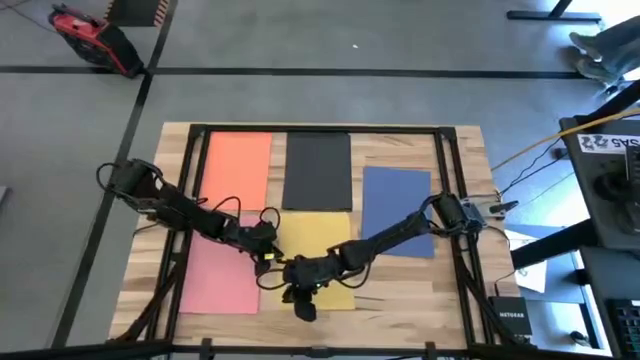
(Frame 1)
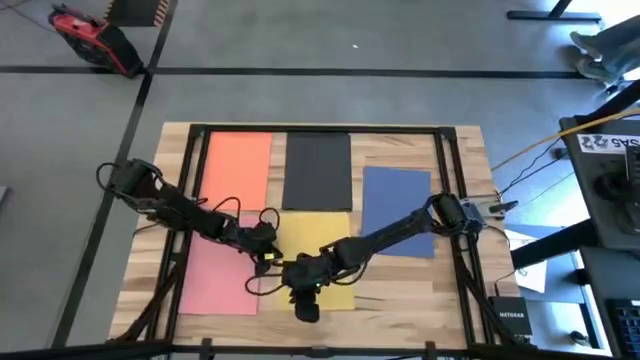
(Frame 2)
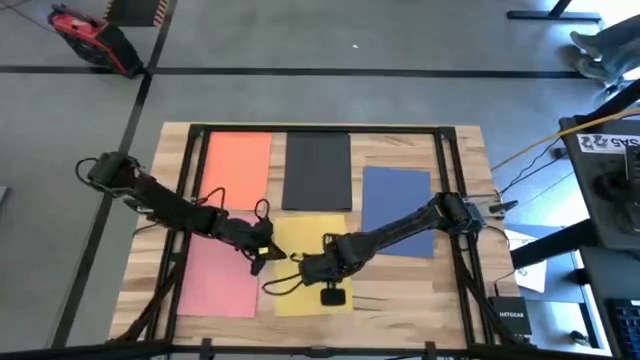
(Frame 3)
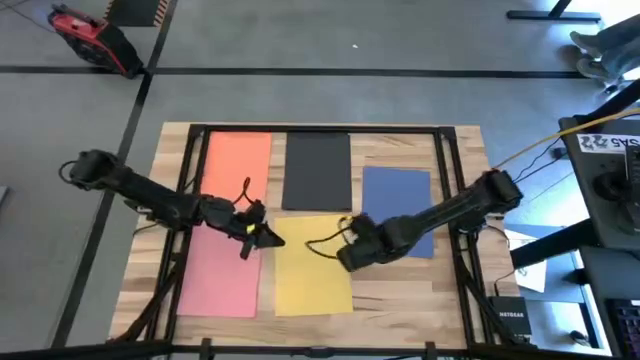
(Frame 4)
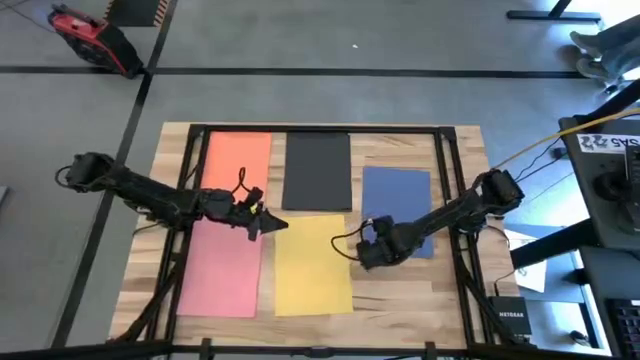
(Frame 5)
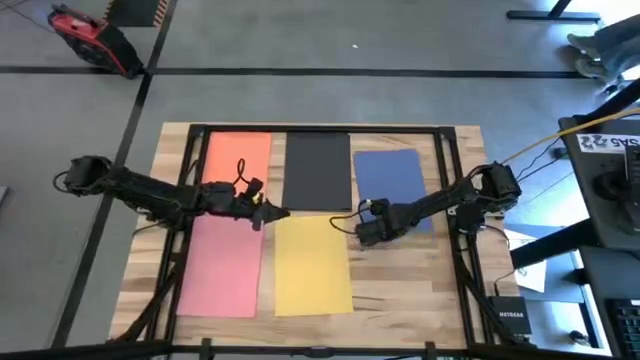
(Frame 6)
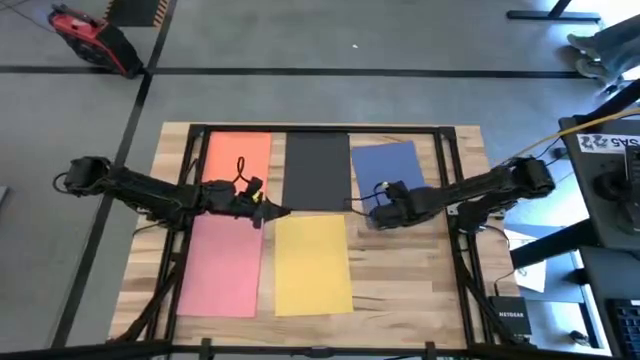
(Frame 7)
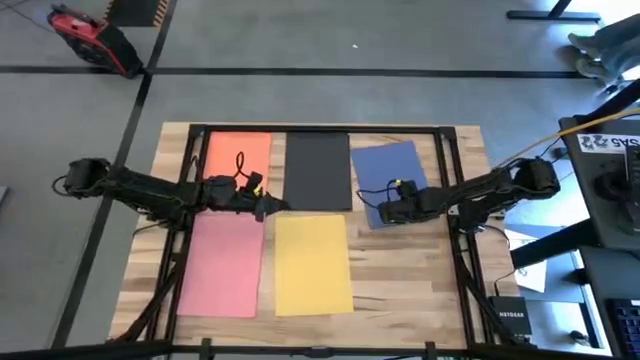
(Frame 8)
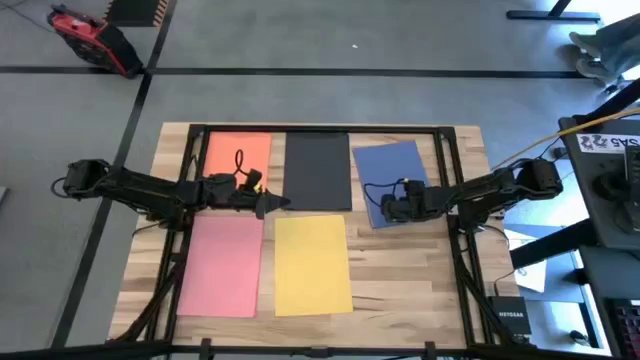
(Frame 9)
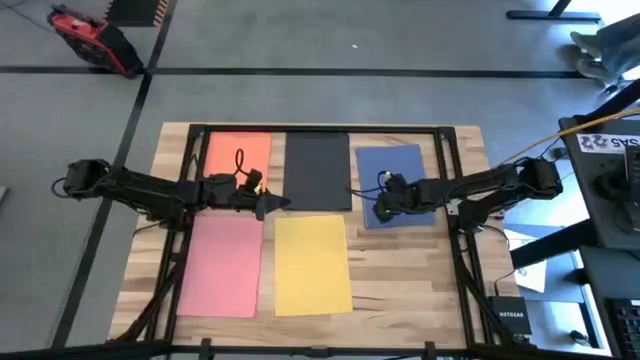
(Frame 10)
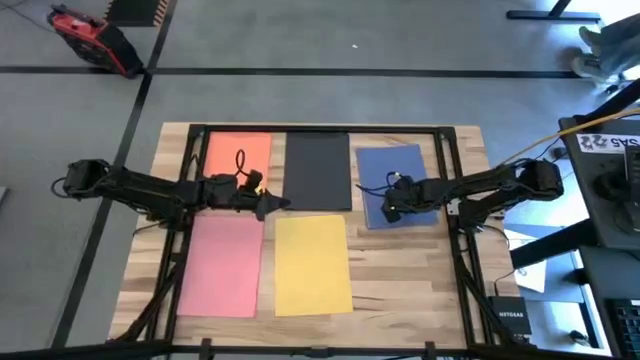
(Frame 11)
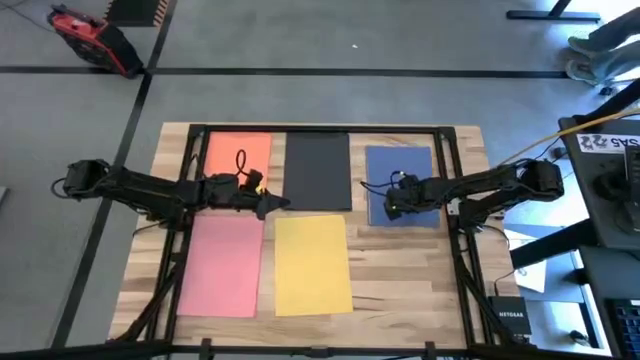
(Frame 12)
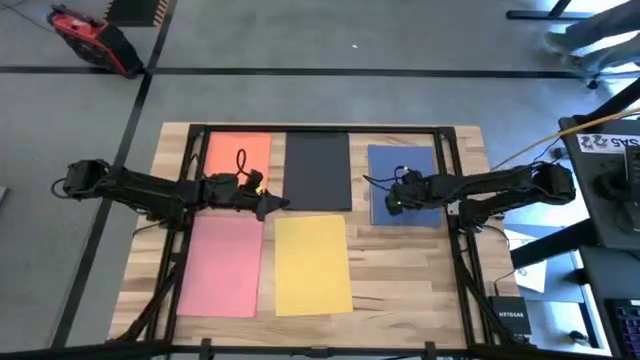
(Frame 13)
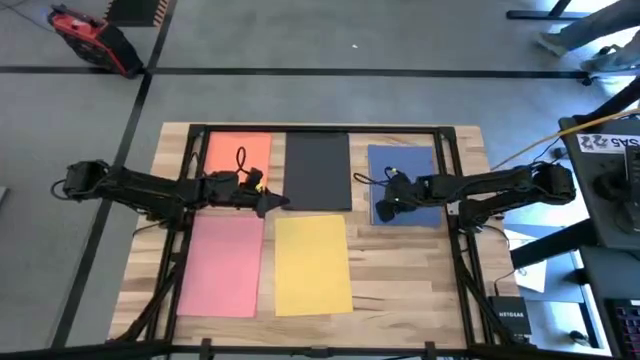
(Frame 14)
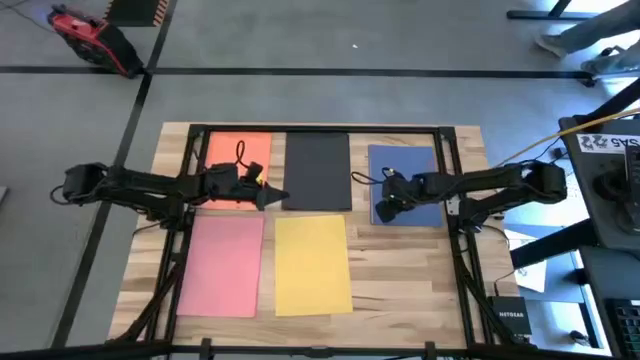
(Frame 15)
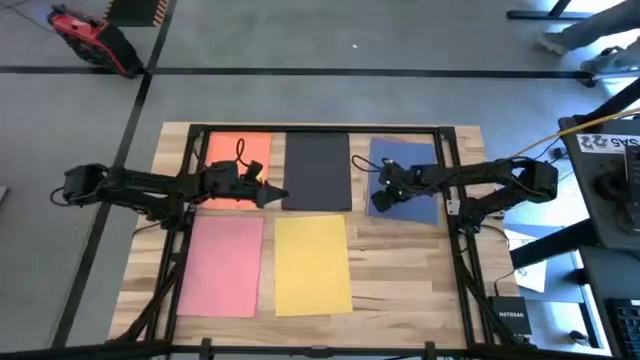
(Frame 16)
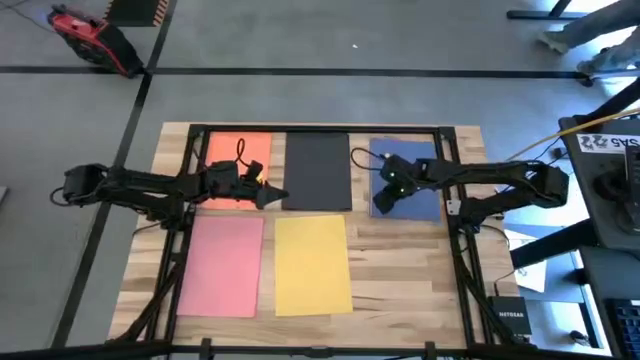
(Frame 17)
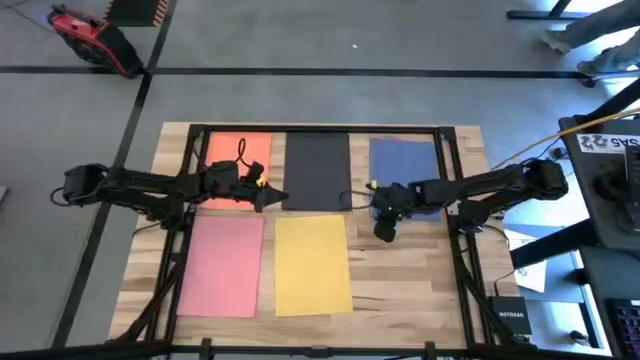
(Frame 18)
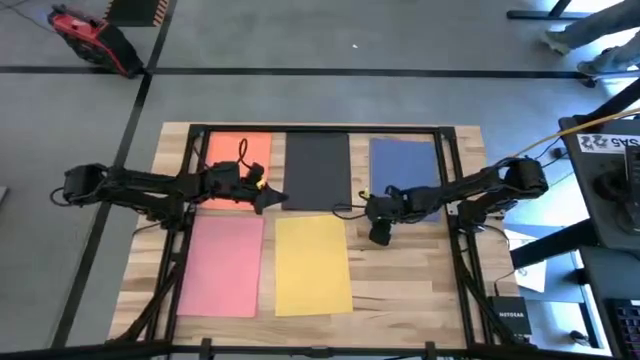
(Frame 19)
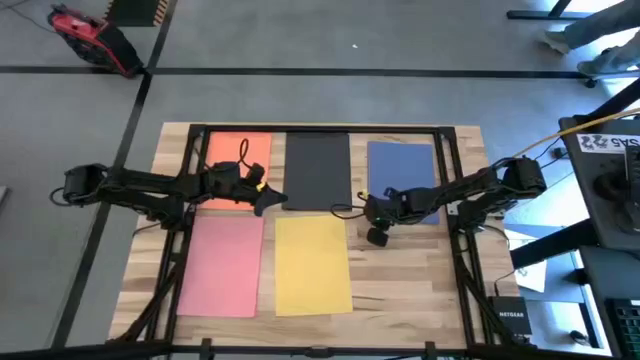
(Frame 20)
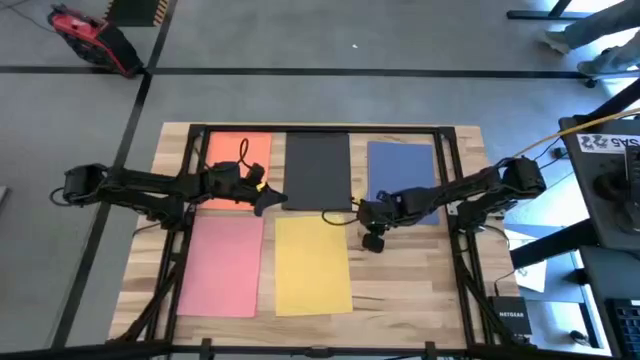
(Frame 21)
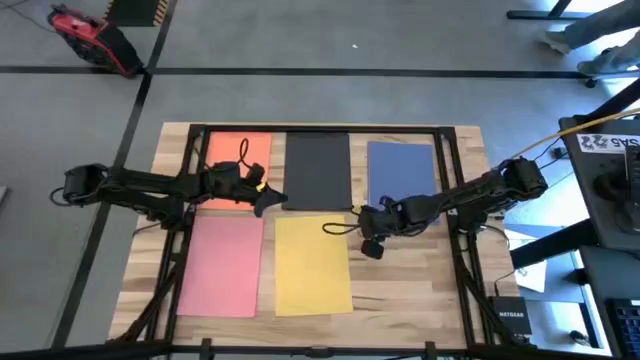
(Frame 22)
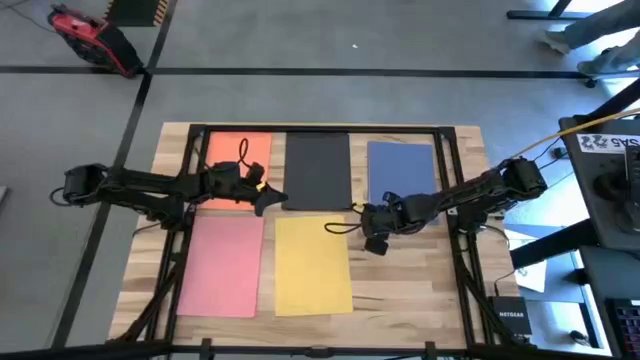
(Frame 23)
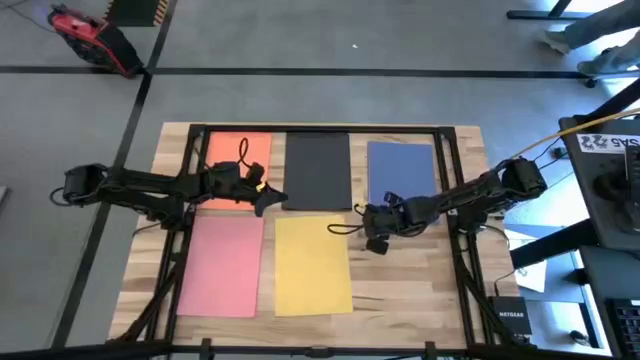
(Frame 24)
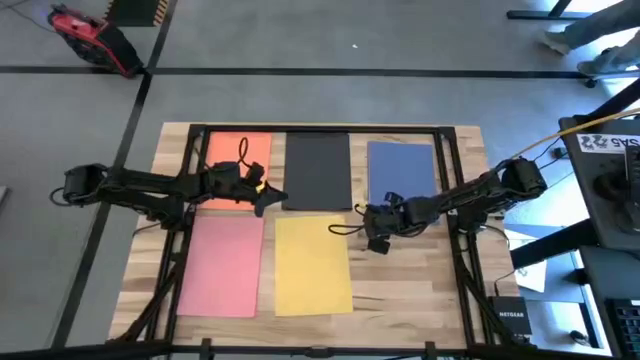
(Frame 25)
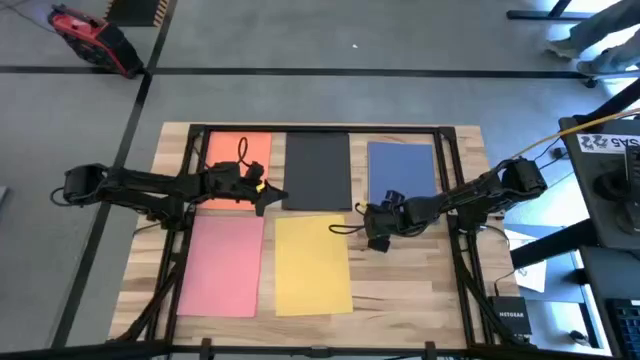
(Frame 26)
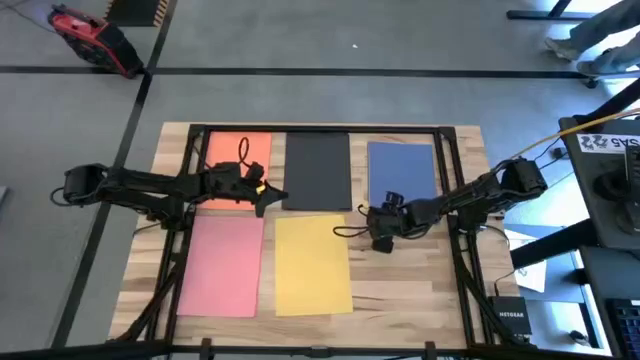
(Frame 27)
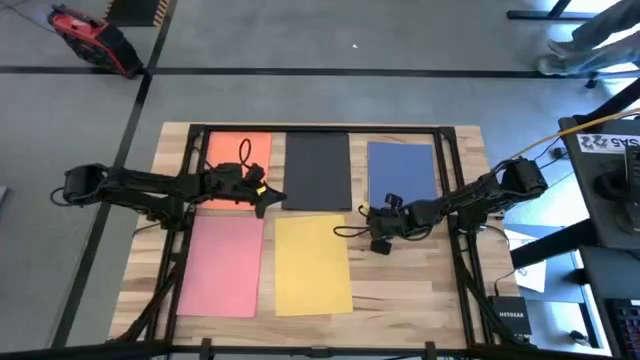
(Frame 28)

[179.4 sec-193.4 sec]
Task: Organize paper
Move the blue color paper to the bottom right of the table

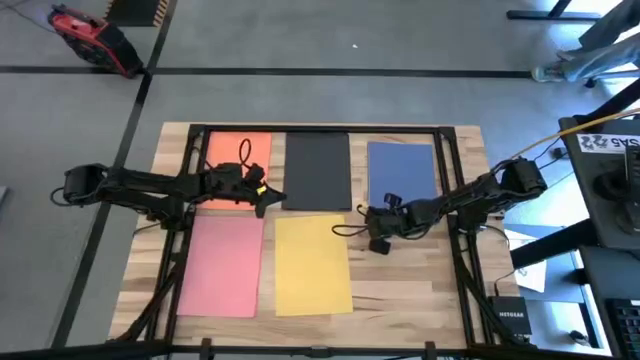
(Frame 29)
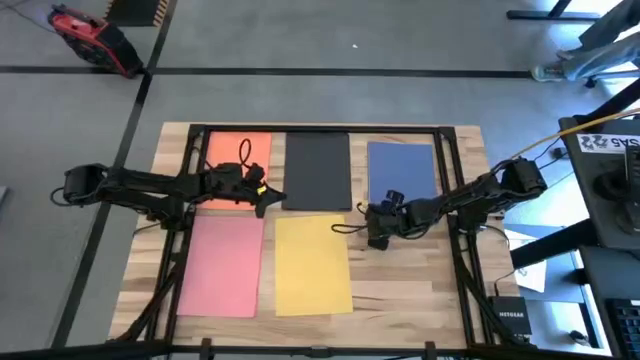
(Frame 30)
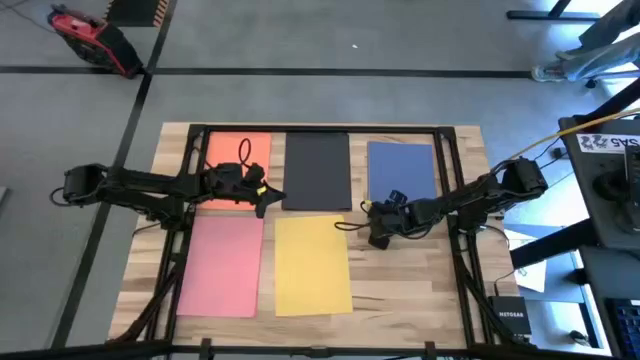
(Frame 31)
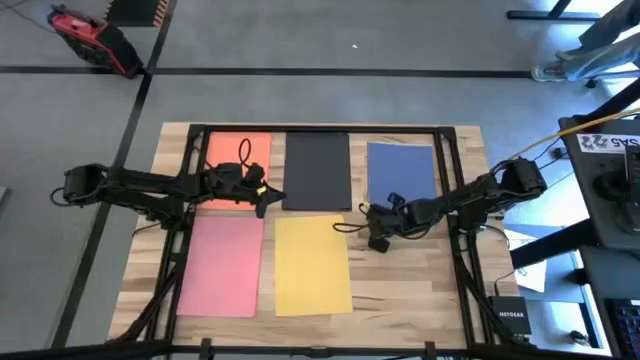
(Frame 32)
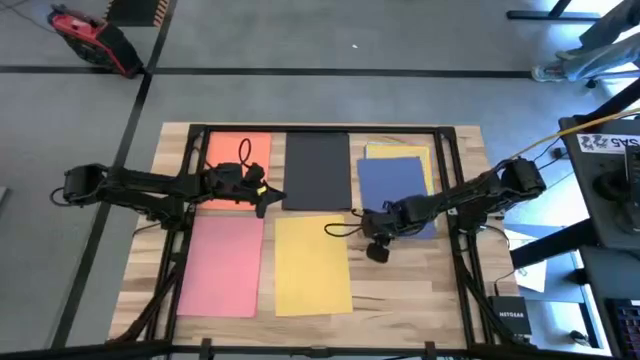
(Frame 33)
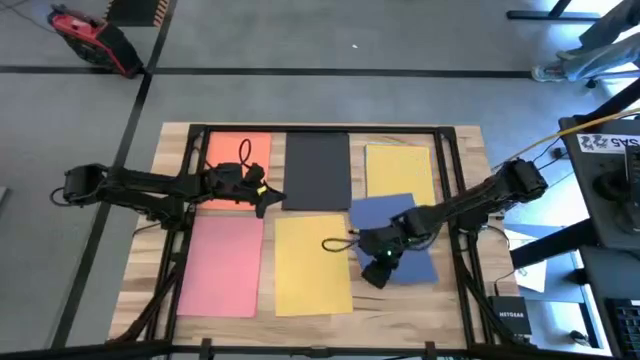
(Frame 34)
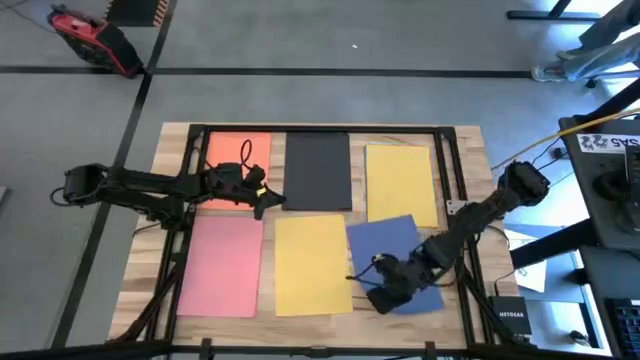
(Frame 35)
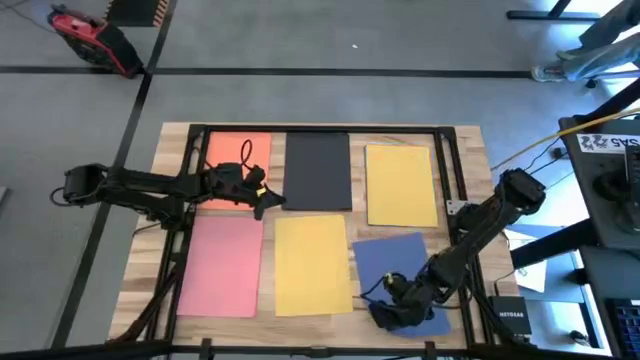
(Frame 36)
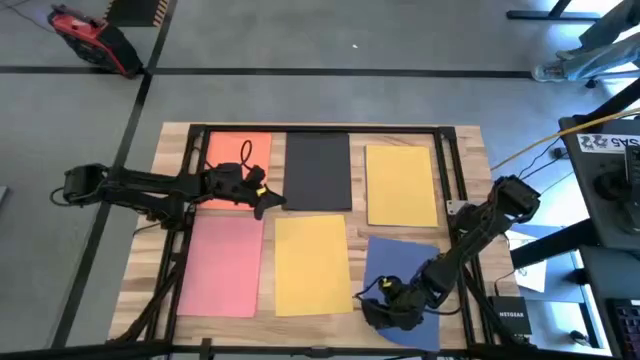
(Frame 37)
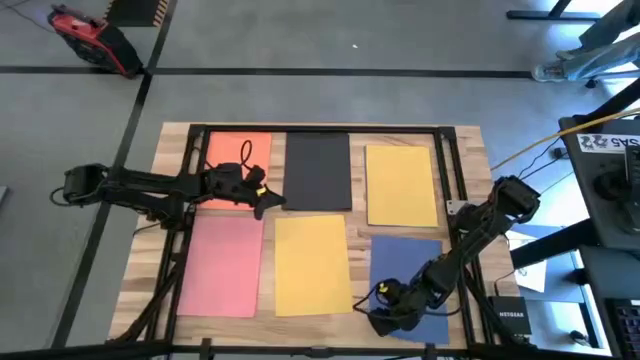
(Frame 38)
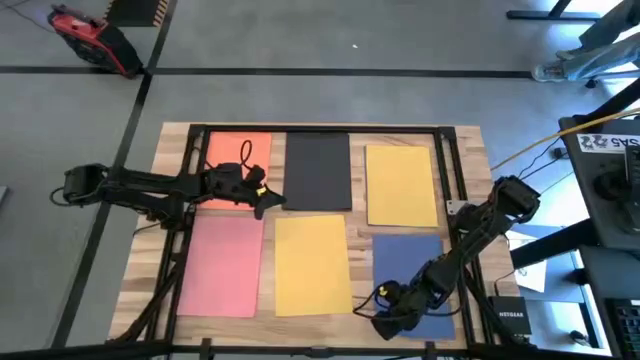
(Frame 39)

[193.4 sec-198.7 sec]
Move the blue color paper to the bottom right of the table

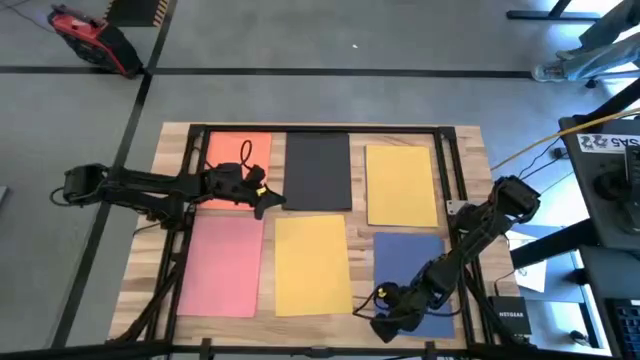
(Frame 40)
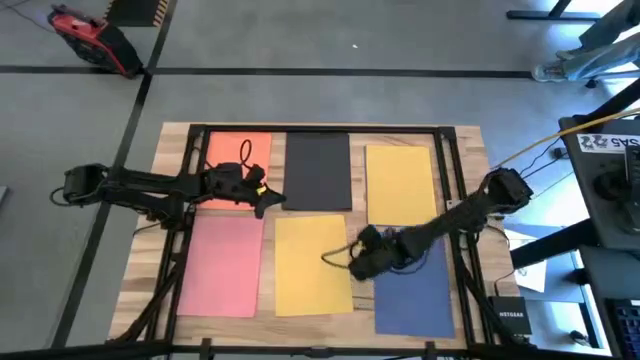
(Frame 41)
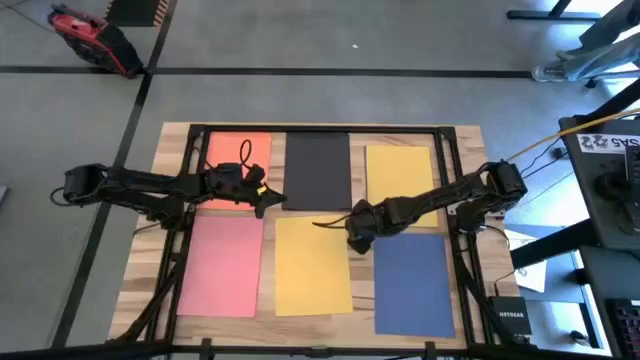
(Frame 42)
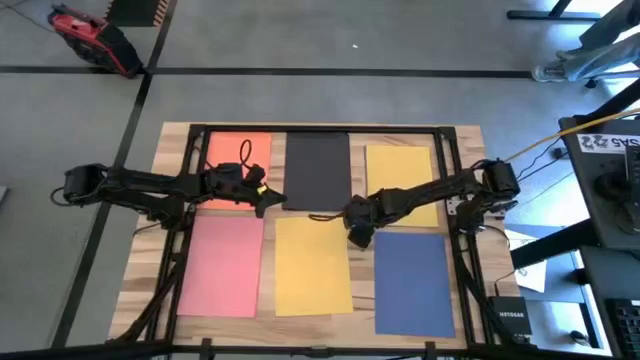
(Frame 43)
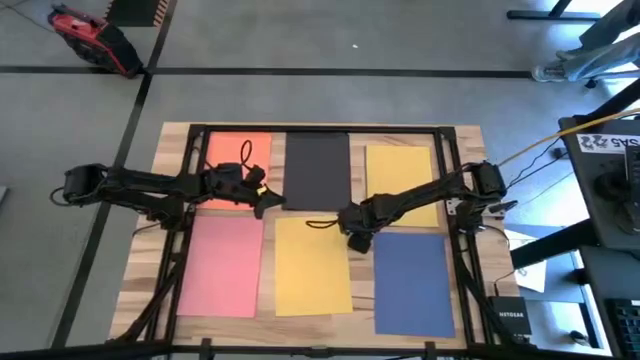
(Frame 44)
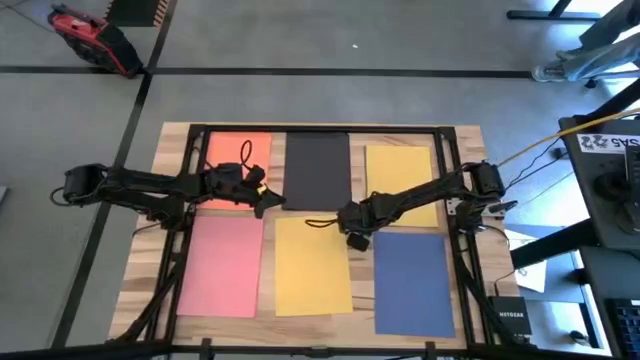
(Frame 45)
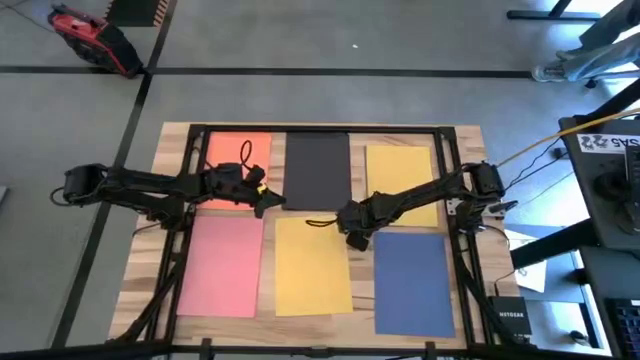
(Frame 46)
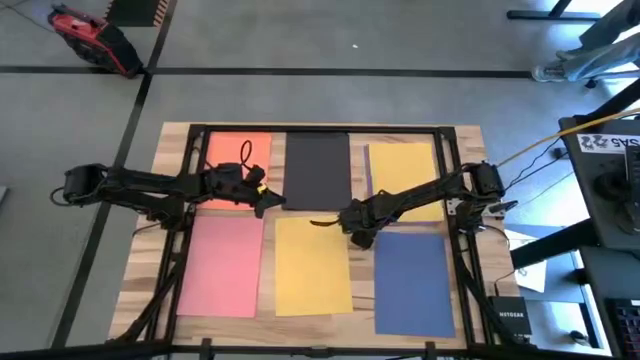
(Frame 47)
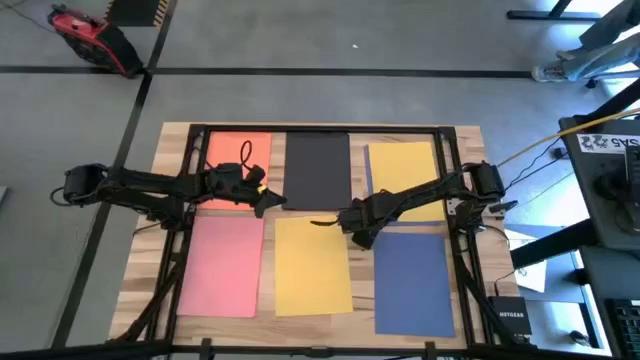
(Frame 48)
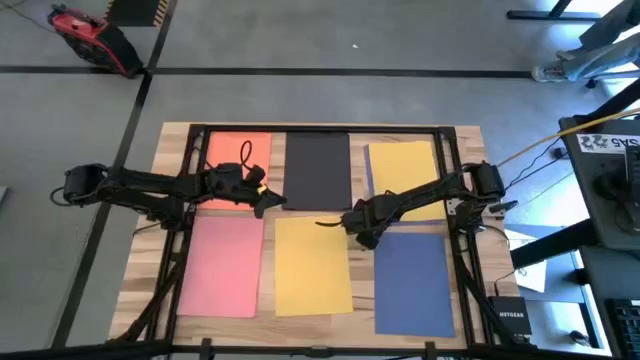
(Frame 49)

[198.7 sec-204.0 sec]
Stack the yellow color paper on top of the other yellow color paper
